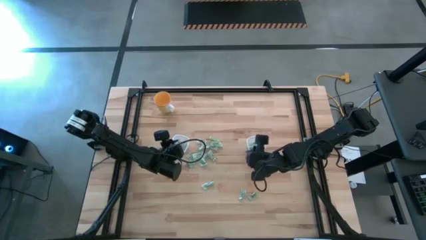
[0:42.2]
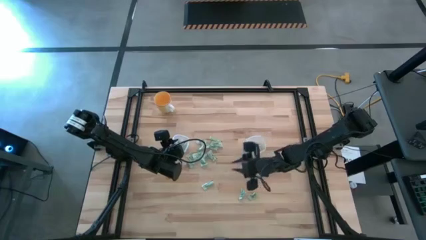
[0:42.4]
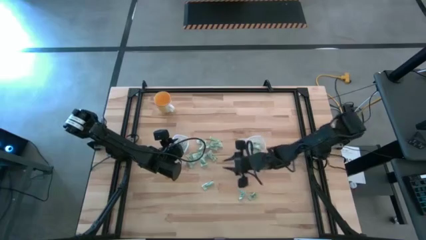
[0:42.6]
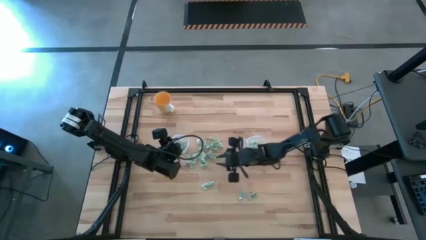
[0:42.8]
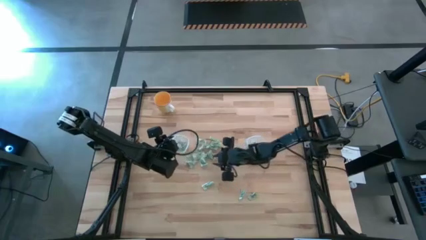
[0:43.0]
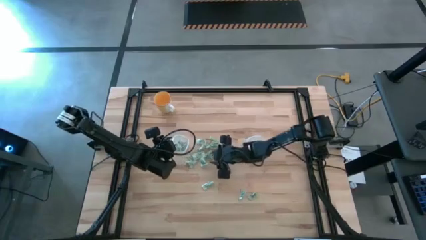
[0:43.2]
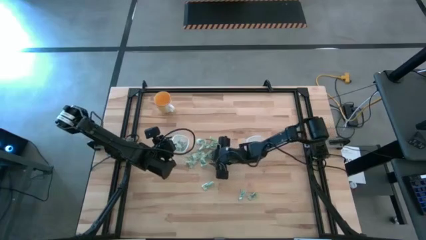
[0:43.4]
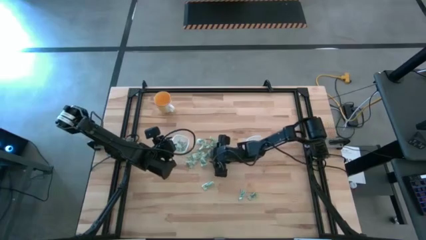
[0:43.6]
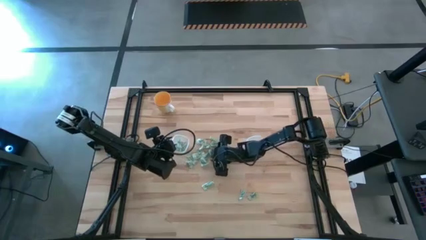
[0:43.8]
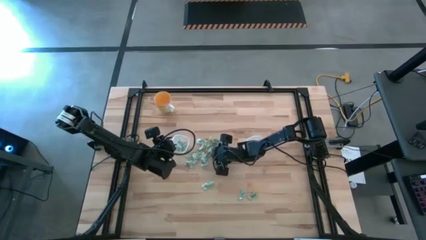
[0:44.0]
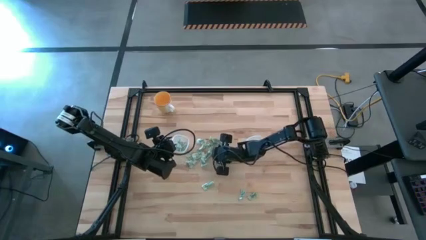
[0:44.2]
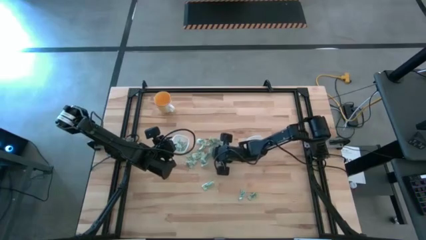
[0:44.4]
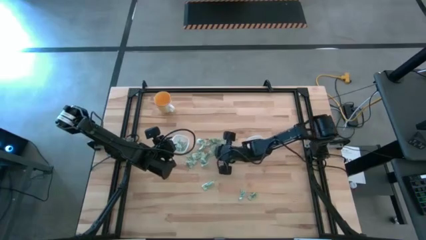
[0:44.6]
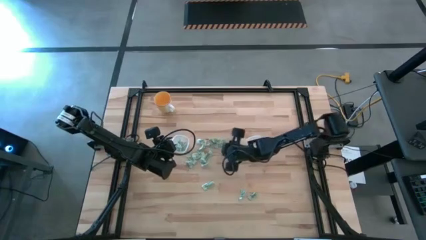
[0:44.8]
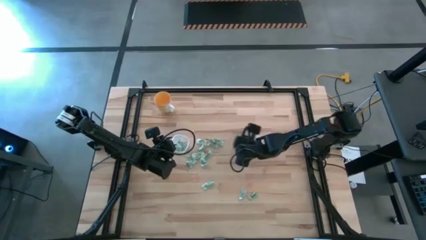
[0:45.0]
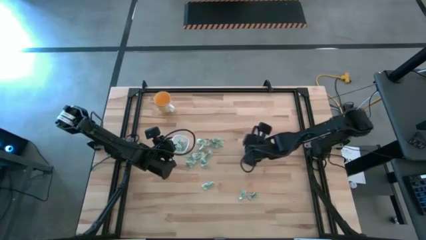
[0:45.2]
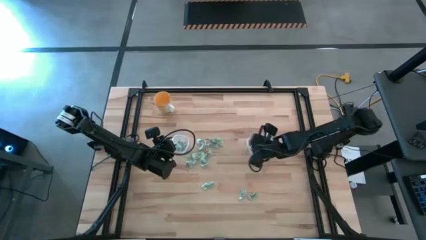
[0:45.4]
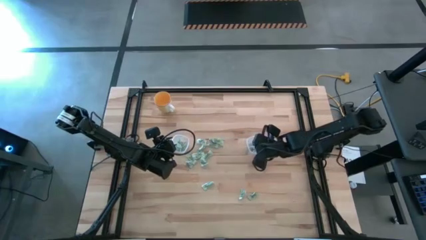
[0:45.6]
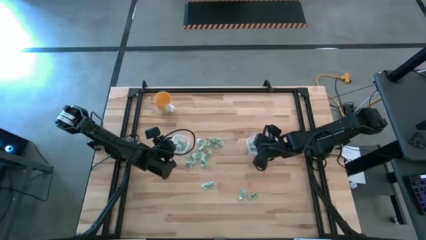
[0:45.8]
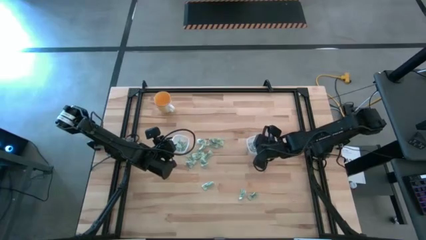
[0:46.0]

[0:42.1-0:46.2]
Task: Pick and place Stevia / Truvia into bins
Put the stevia packet into the right transparent container

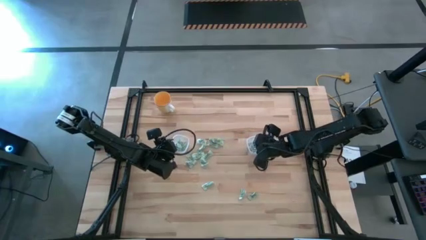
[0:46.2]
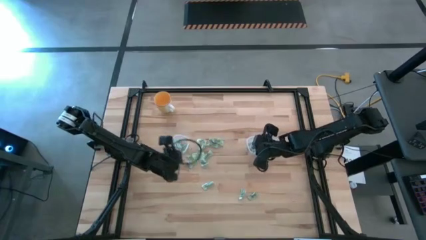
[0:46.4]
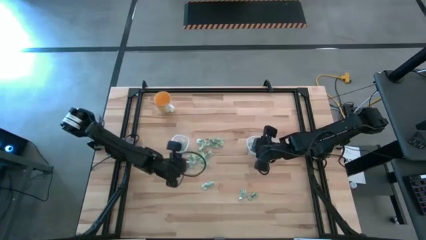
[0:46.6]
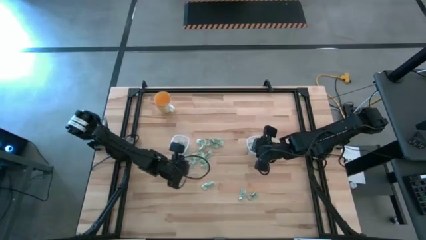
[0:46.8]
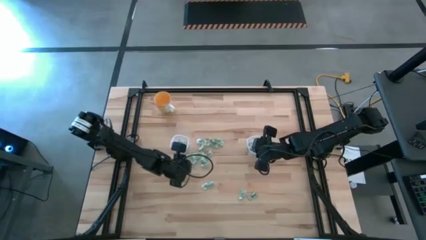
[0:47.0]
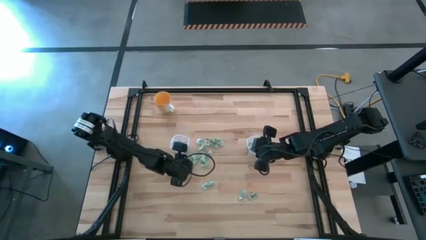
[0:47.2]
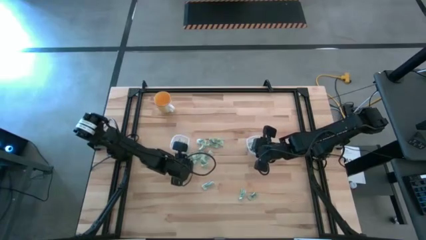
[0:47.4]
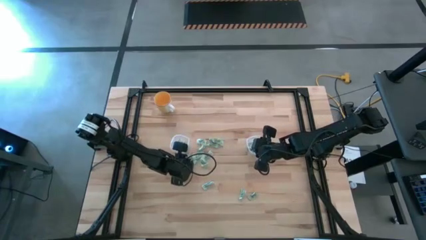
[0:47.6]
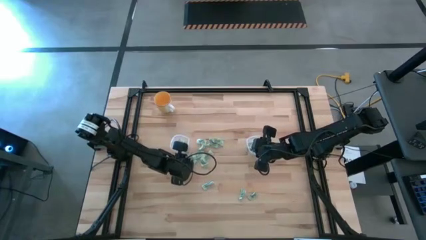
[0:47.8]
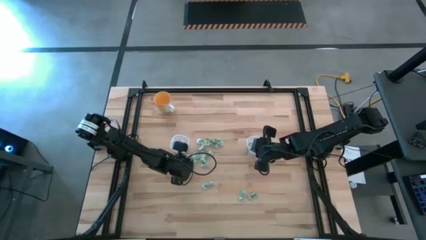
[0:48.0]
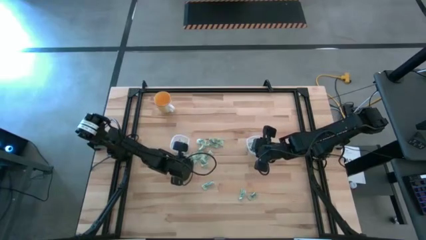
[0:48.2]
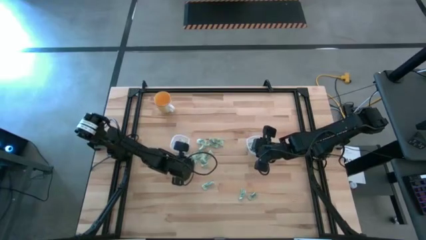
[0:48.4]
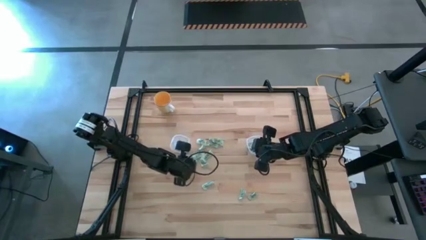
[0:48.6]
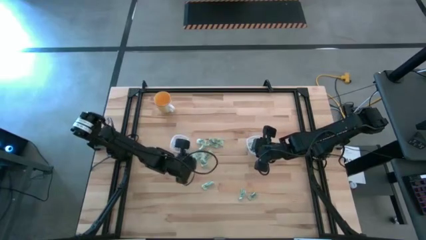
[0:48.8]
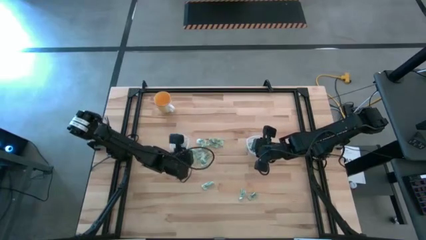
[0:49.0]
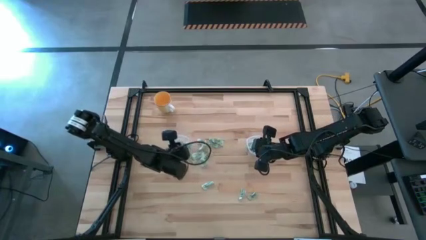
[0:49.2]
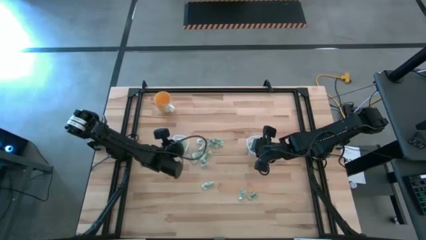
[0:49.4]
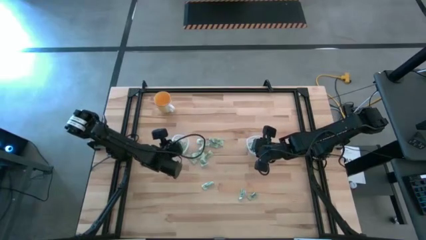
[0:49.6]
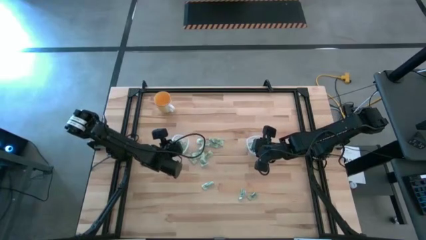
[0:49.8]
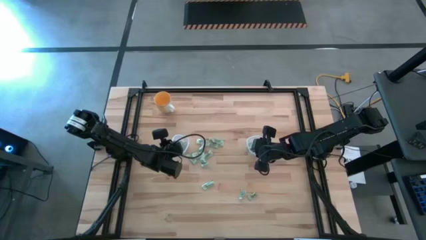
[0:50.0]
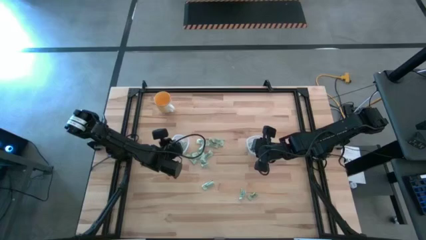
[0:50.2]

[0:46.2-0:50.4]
Put the stevia packet into the left transparent container

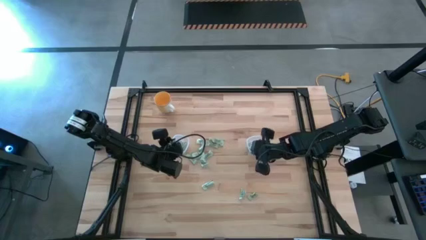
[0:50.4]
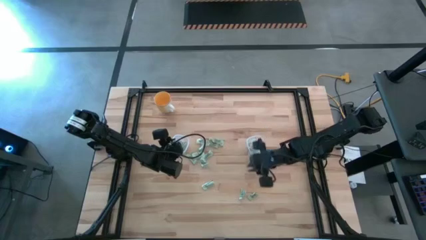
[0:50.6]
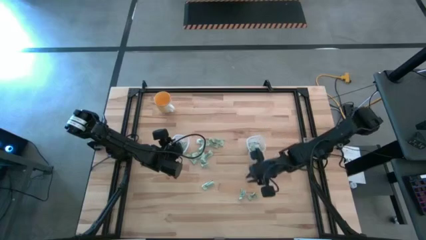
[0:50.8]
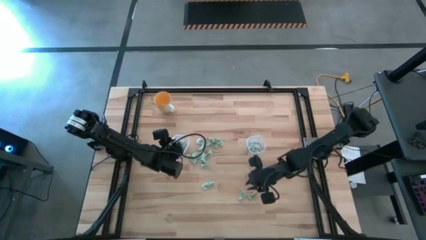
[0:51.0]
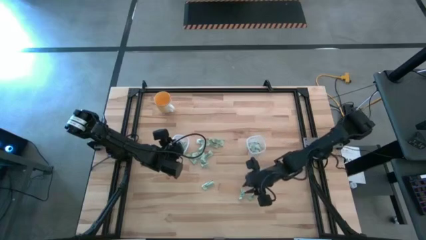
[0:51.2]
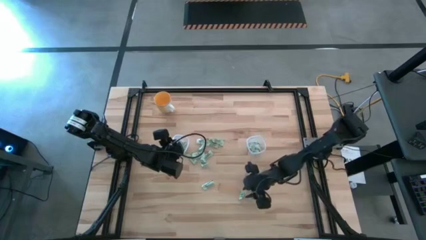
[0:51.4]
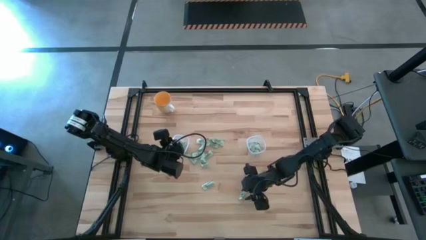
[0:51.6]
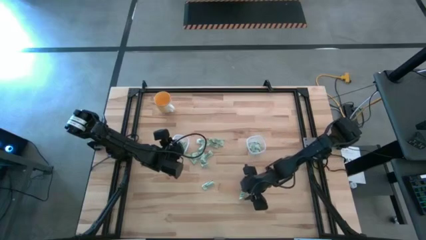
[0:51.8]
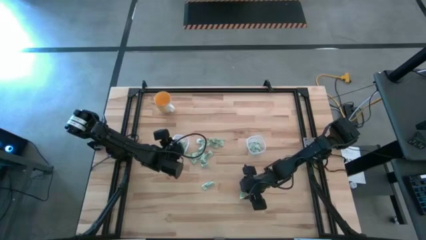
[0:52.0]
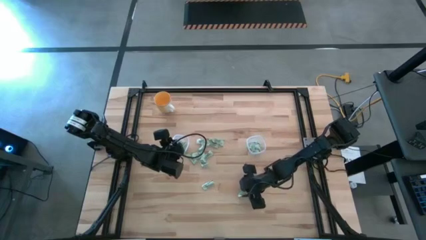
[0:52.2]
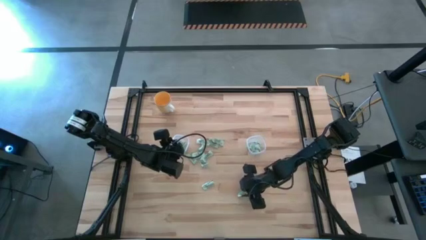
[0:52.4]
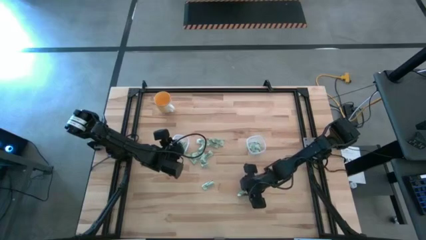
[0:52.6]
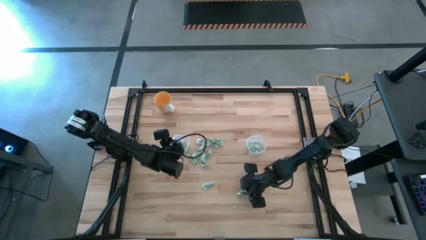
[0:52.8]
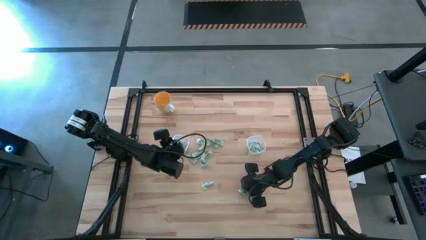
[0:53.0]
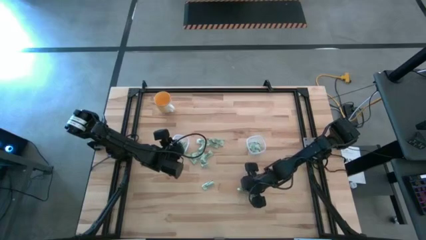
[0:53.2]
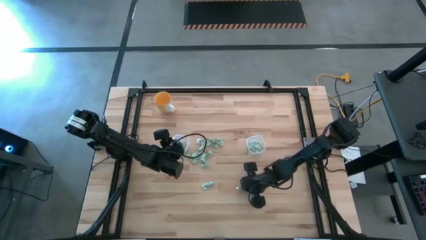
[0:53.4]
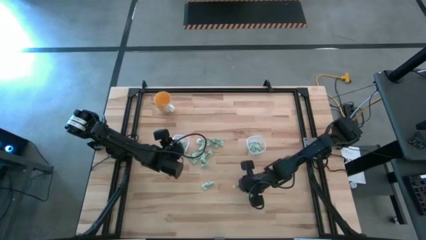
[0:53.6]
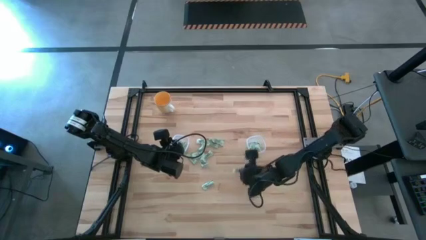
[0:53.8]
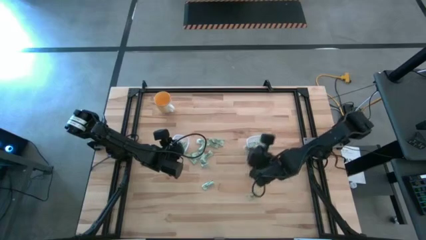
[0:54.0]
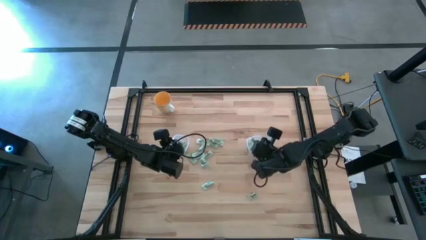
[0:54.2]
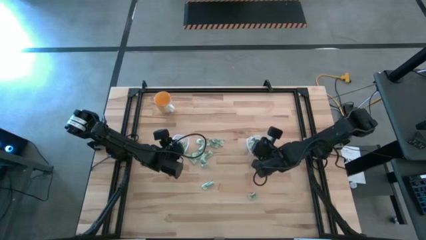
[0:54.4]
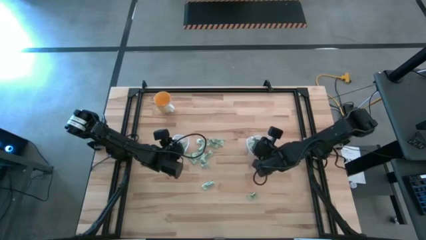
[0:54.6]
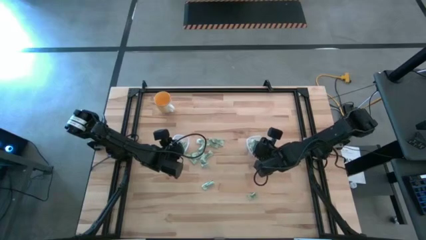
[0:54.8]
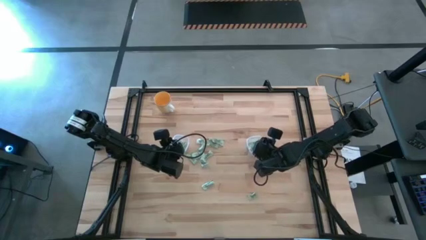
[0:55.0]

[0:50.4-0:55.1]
Put the stevia packet into the right transparent container

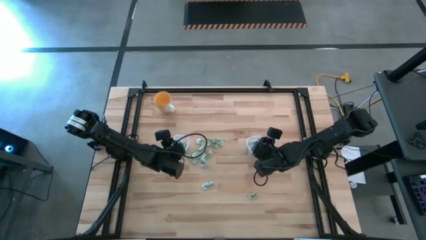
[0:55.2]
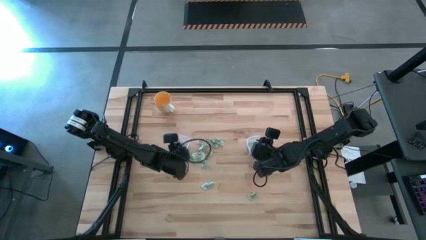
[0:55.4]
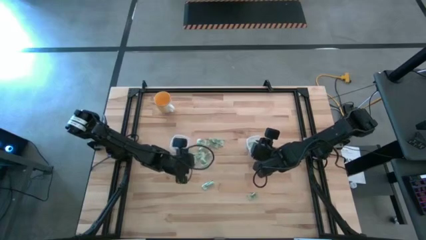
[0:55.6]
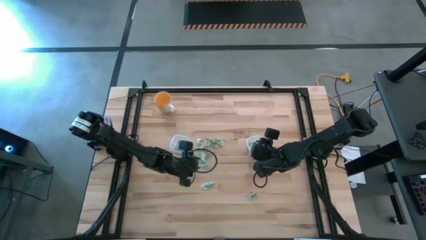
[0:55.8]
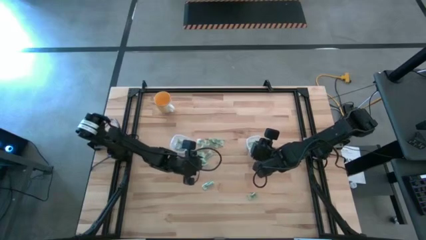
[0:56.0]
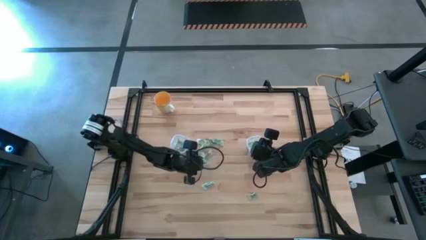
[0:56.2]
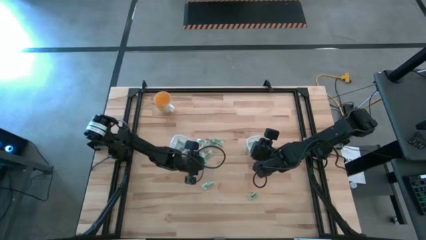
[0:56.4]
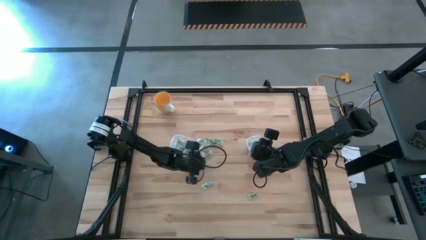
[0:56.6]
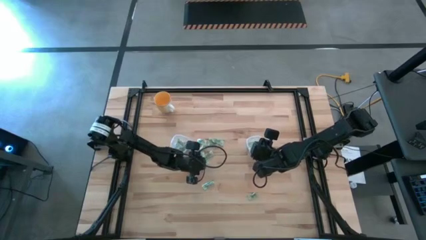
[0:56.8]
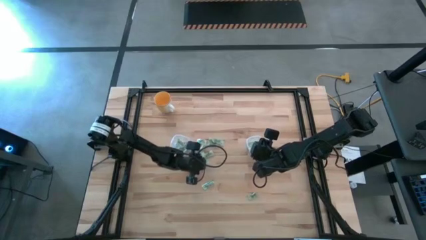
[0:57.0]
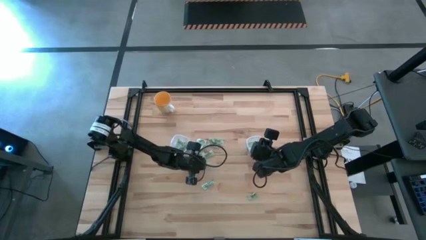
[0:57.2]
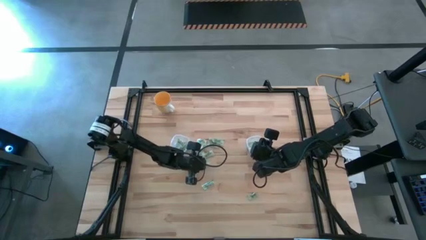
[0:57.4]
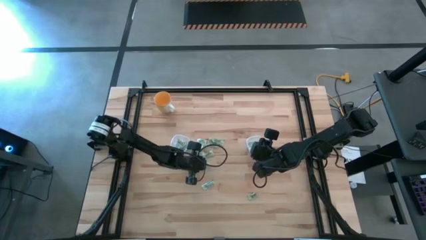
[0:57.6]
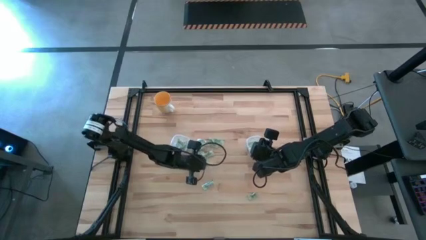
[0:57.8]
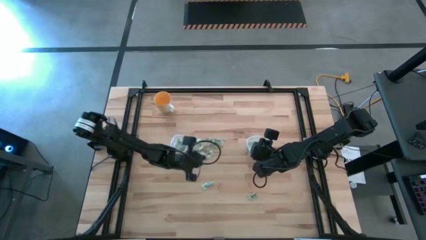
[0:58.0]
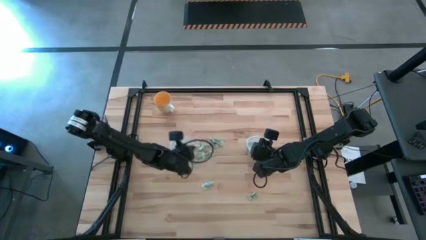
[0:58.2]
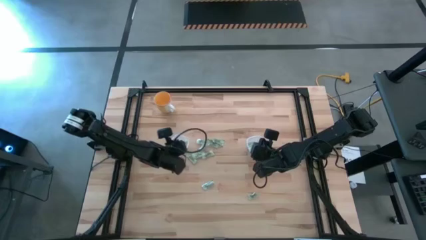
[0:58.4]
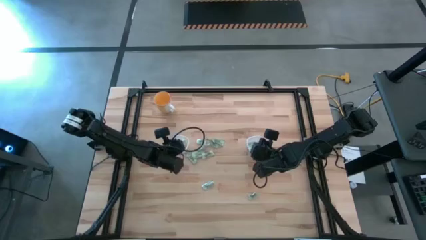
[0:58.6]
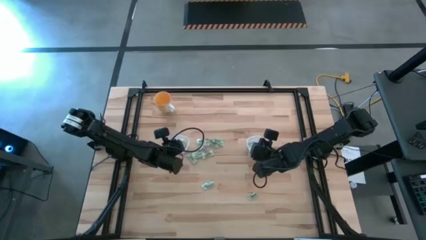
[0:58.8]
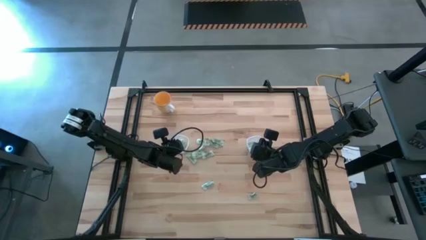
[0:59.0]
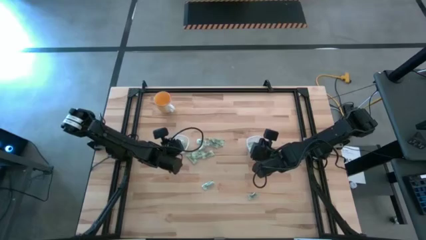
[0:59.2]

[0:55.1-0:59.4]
Put the stevia packet into the left transparent container
